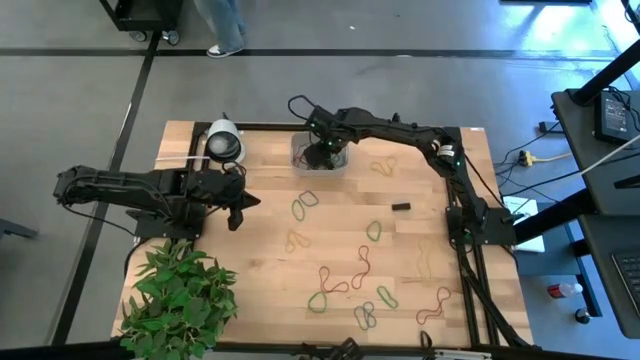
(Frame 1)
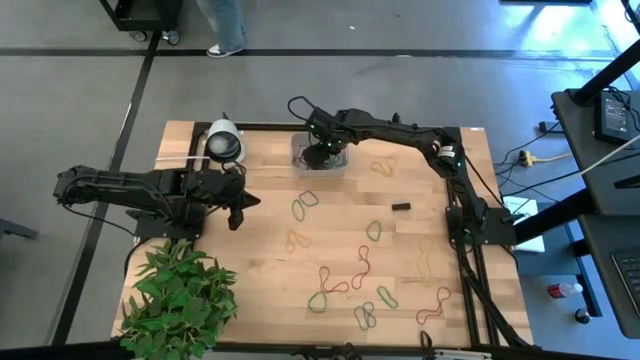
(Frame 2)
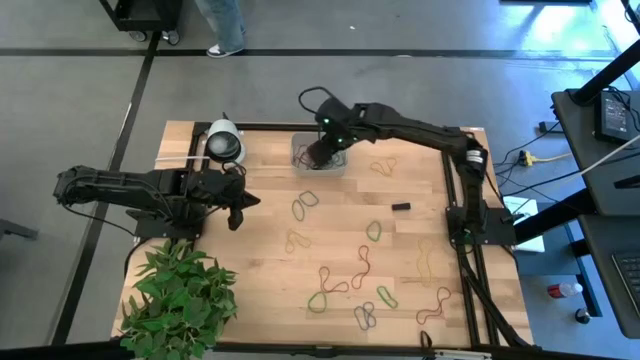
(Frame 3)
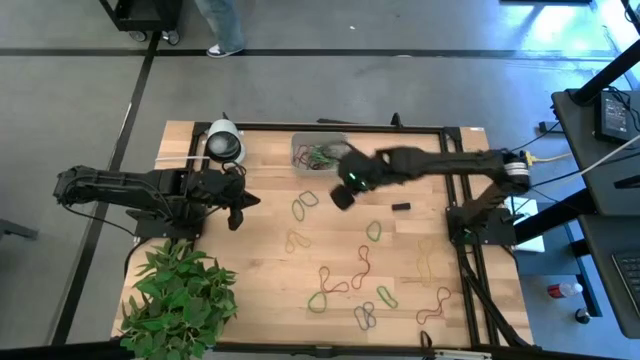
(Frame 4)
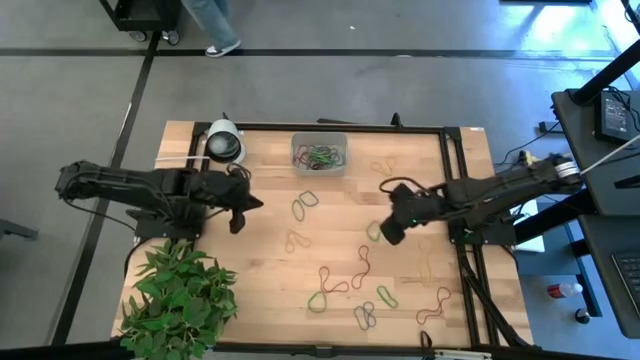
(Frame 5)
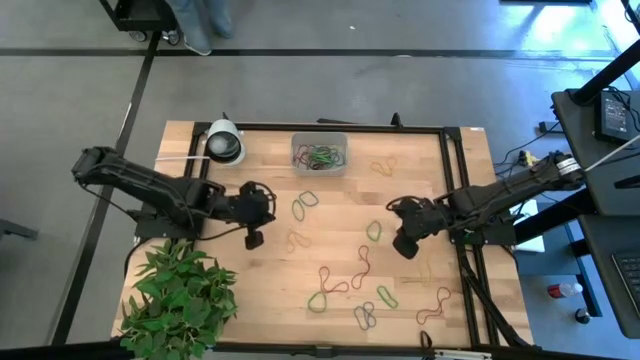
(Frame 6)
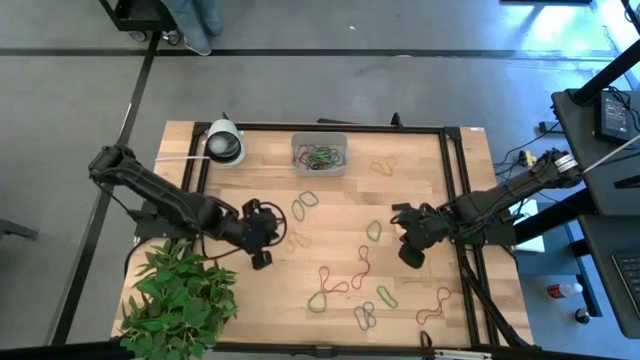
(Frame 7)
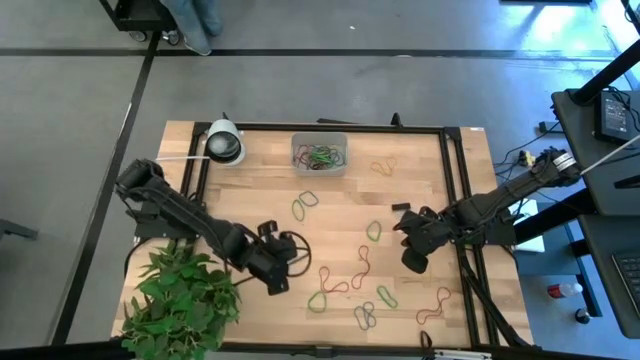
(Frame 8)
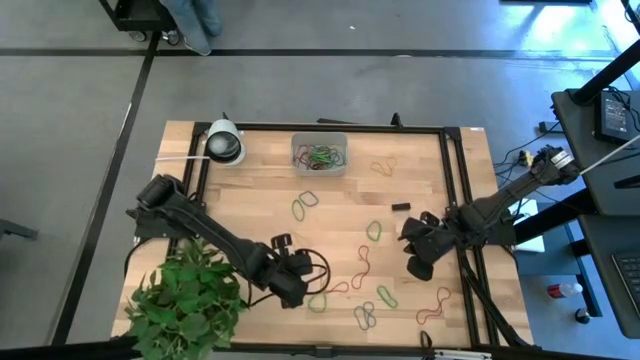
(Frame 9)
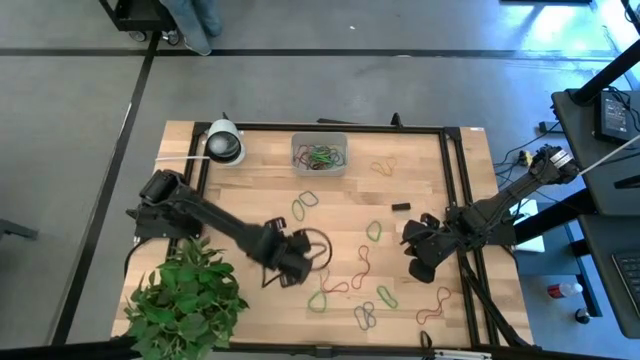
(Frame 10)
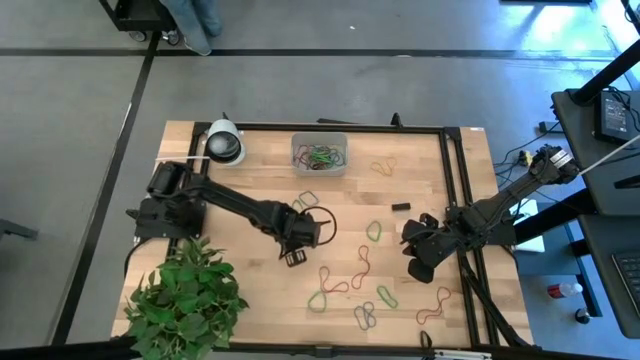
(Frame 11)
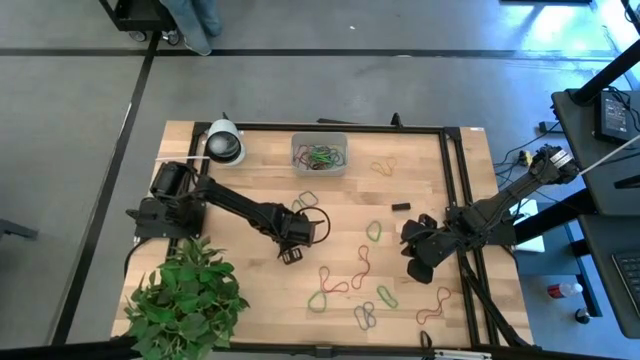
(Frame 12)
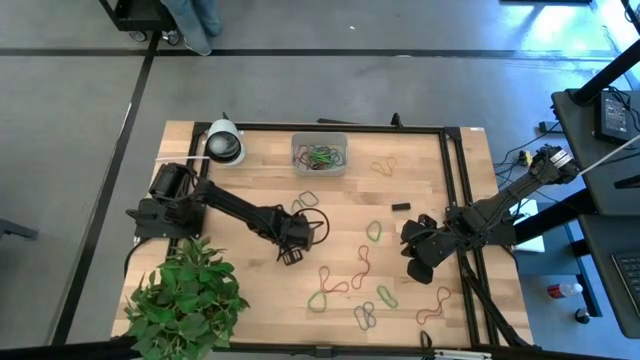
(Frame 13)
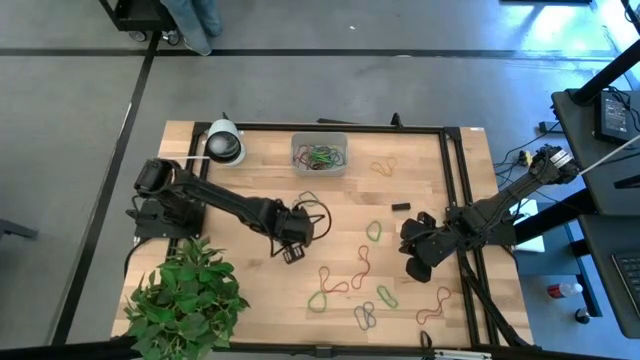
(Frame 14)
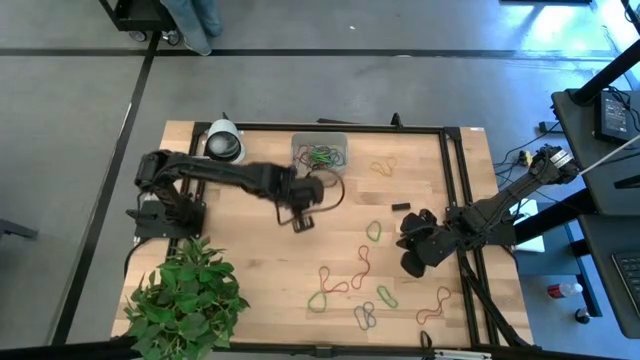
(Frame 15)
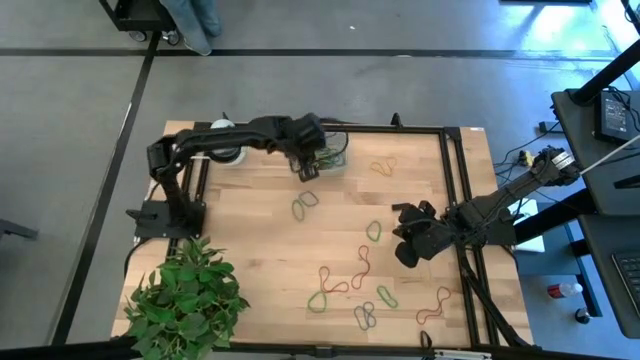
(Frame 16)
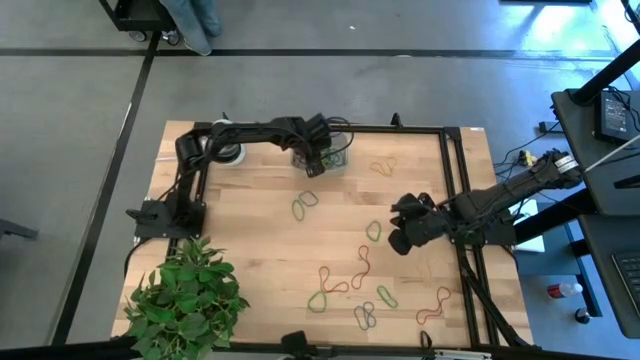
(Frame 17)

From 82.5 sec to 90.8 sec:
Task: Pick and place rubber bands into bin
Put the yellow rubber band into the white bin

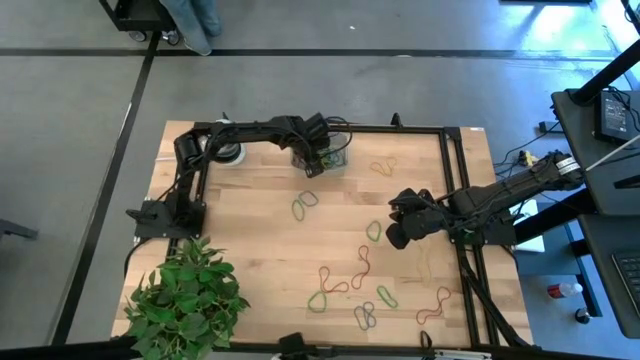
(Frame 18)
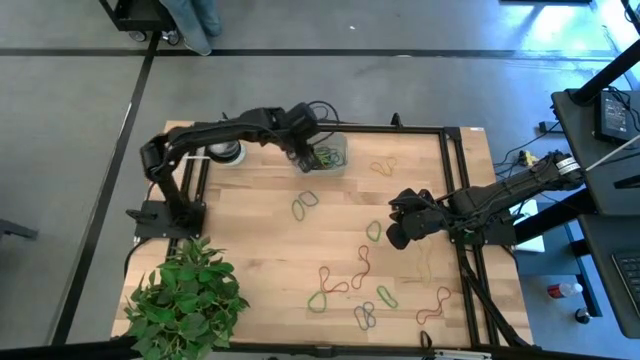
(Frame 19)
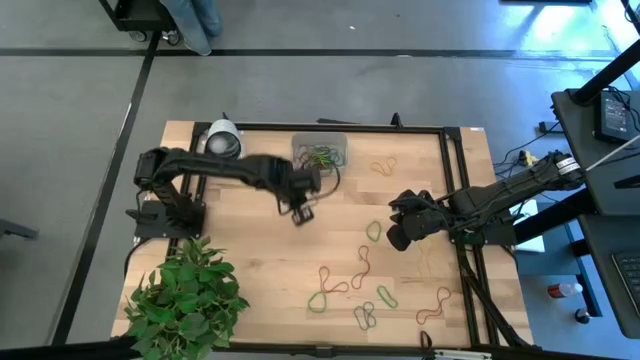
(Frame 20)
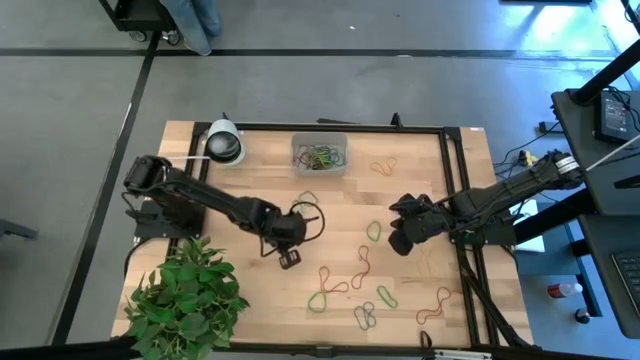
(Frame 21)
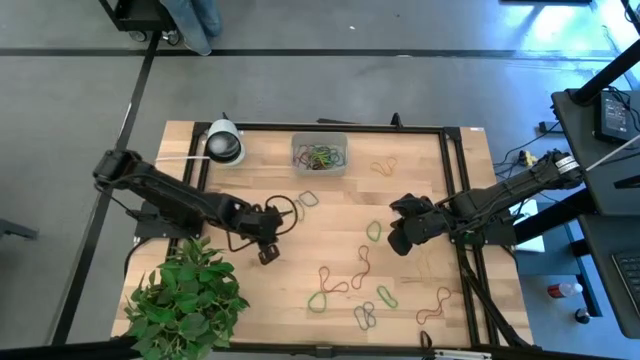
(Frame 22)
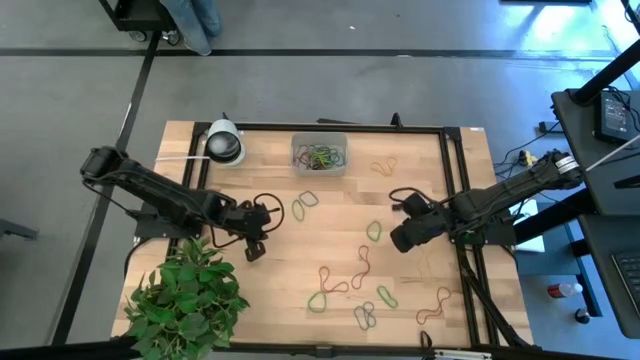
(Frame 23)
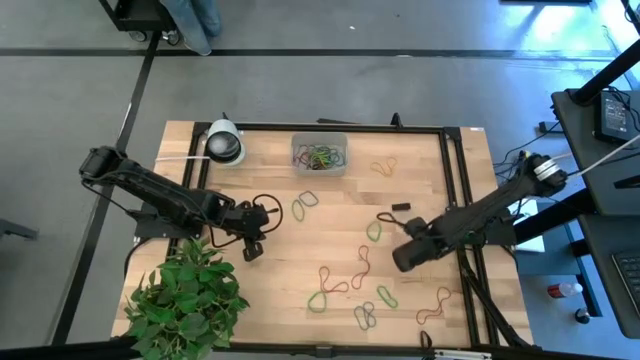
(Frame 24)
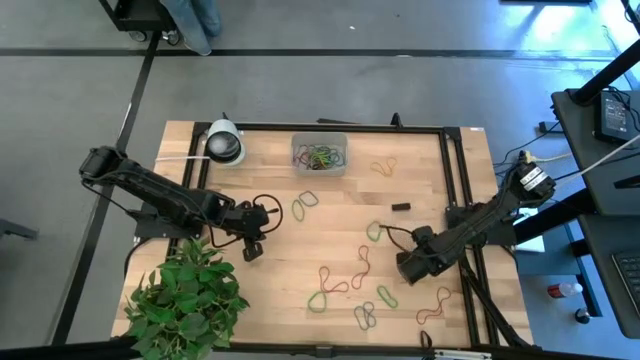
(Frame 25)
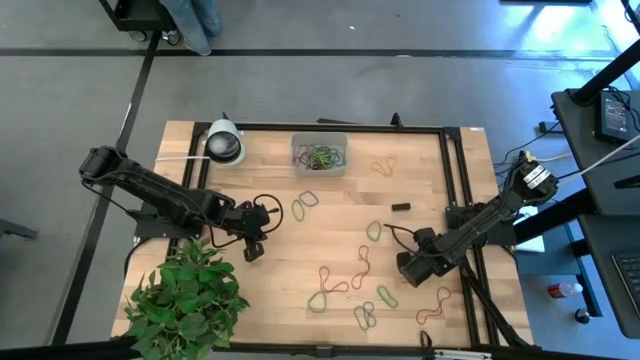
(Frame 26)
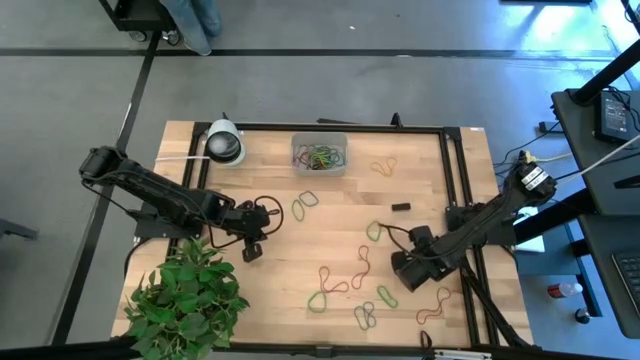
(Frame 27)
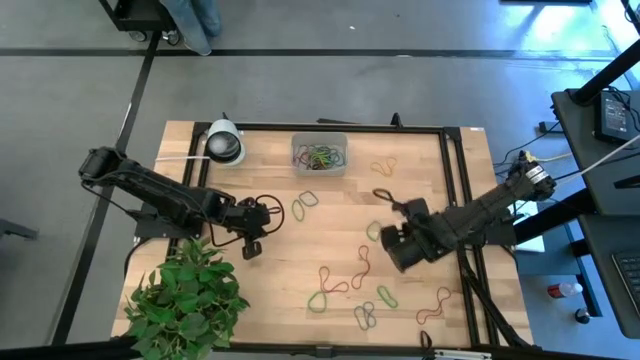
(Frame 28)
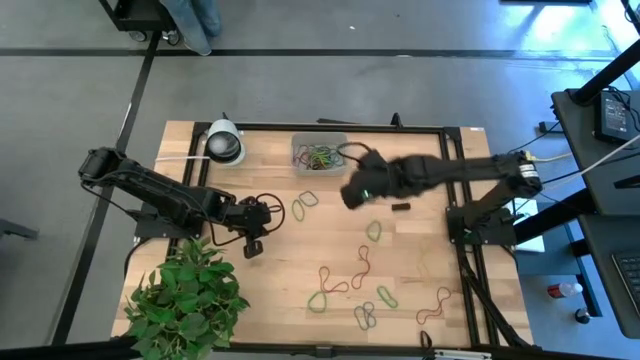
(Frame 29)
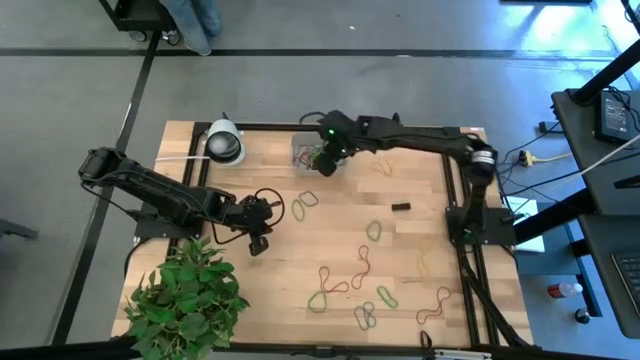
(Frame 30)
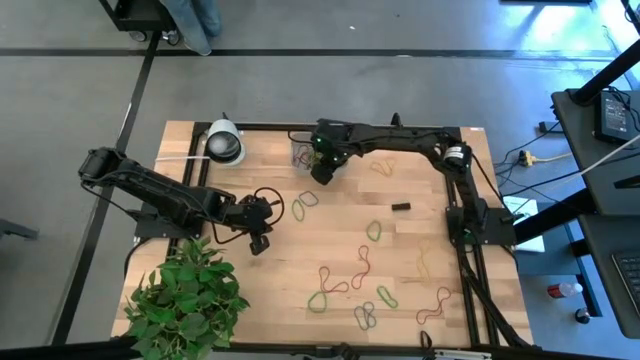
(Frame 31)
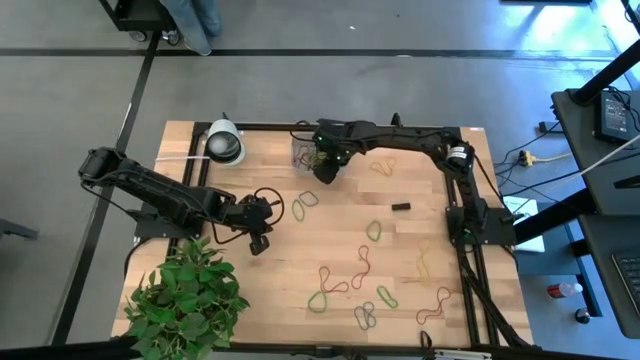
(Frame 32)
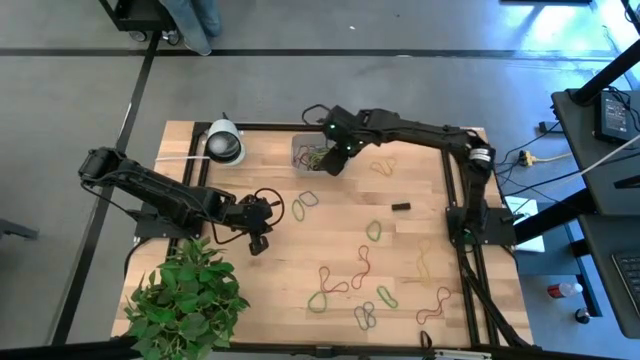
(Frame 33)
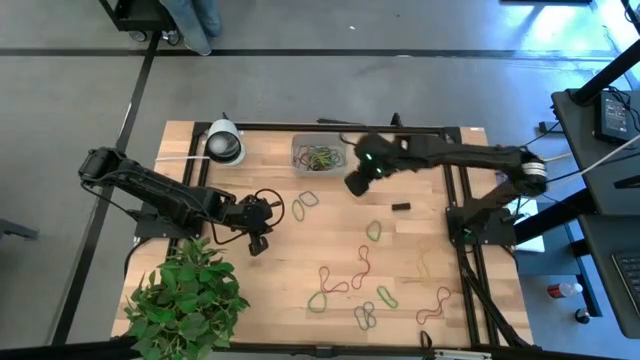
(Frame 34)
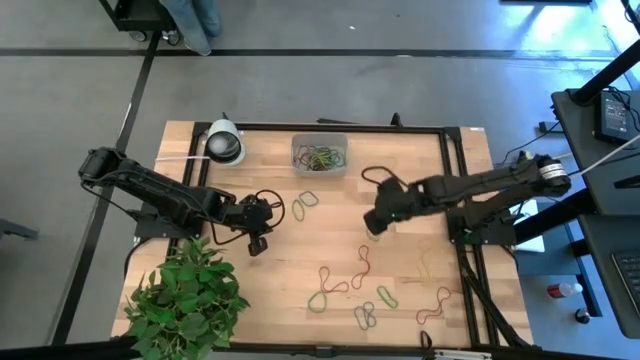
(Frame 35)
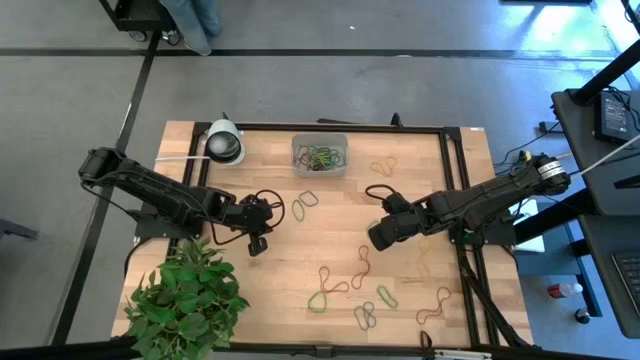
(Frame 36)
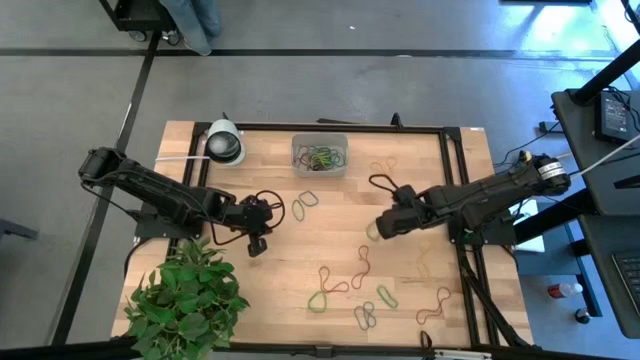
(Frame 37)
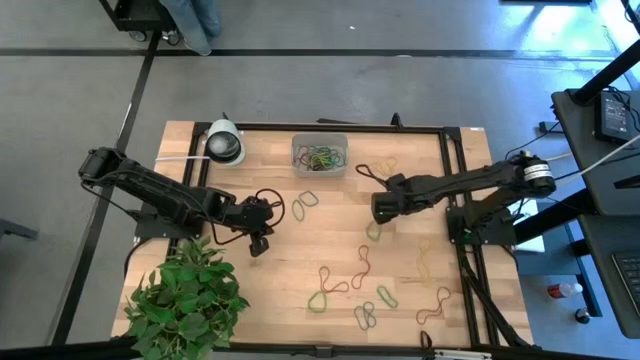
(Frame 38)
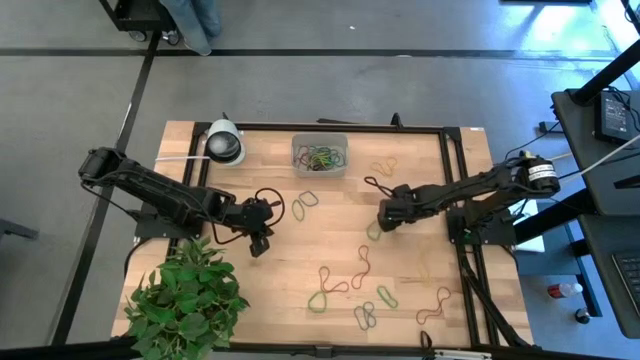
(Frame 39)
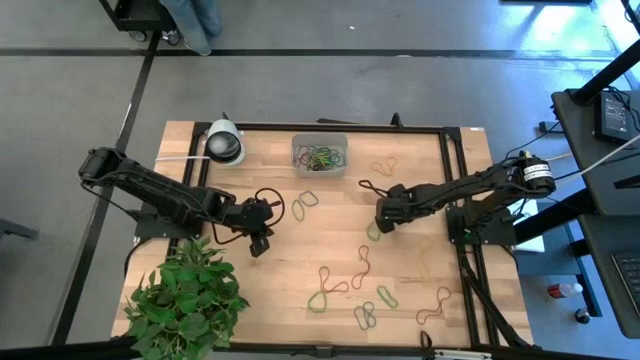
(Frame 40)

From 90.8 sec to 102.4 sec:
Put the black rubber band into the white bin

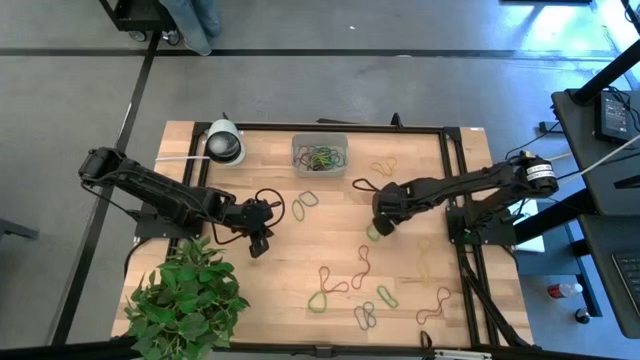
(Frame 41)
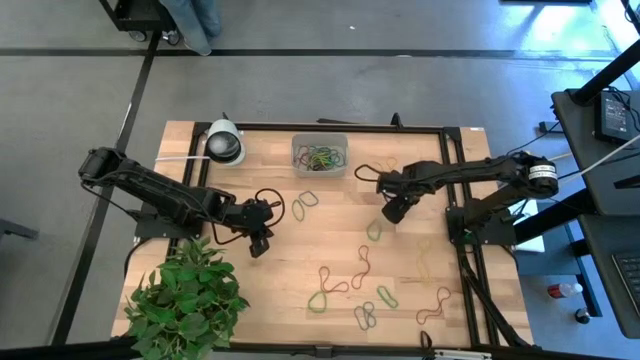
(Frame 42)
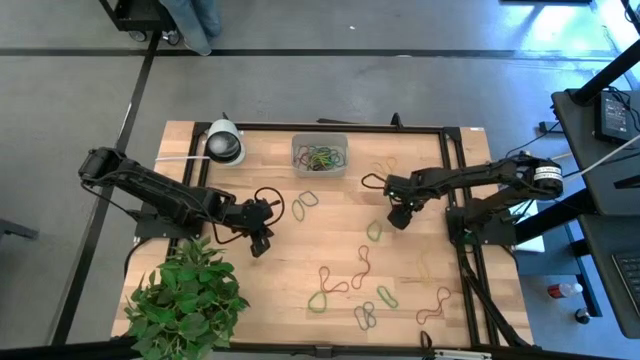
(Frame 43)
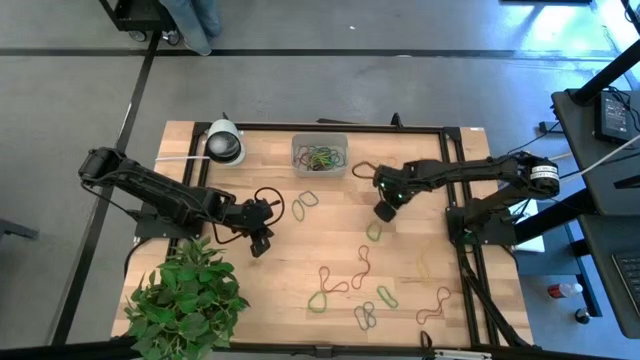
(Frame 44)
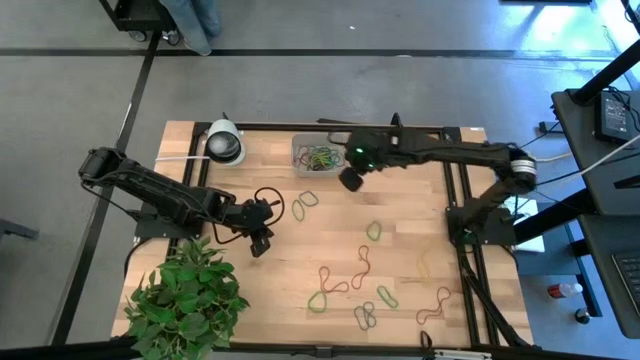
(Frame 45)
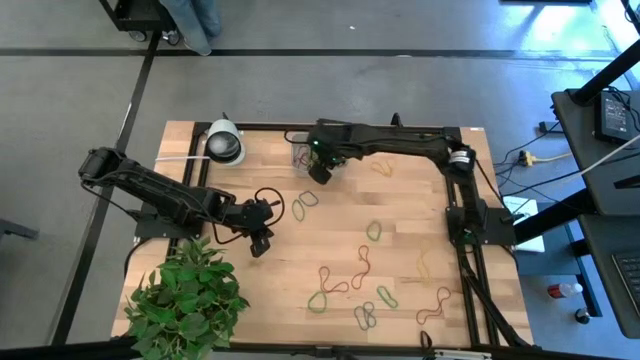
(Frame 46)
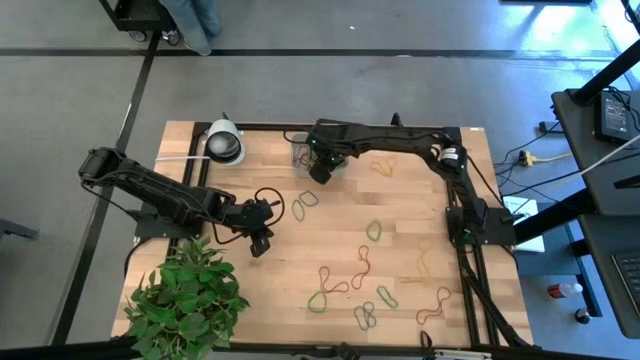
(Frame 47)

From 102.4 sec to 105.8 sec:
Put the black rubber band into the white bin
